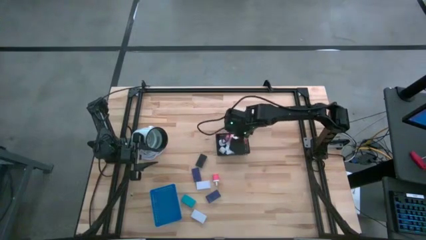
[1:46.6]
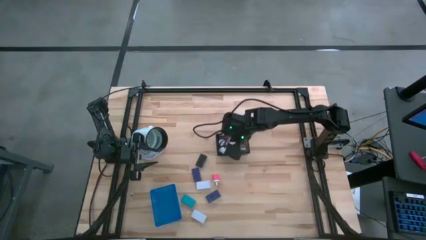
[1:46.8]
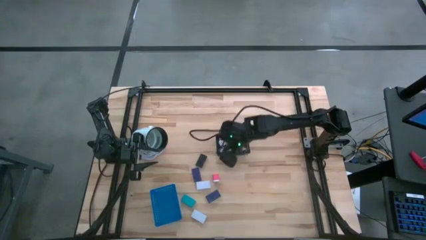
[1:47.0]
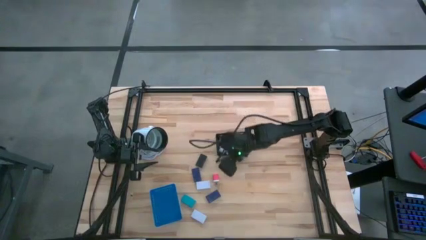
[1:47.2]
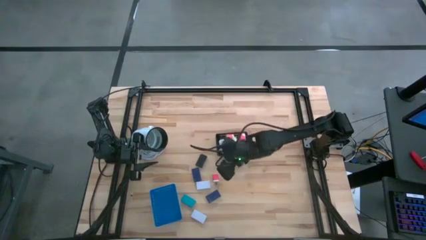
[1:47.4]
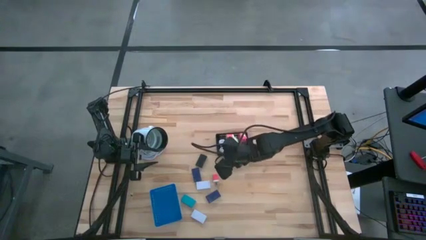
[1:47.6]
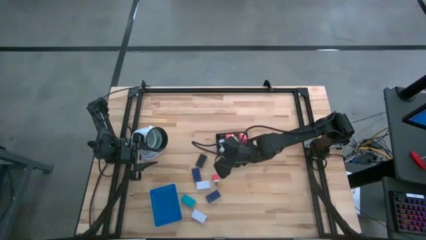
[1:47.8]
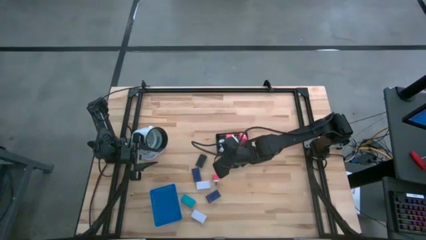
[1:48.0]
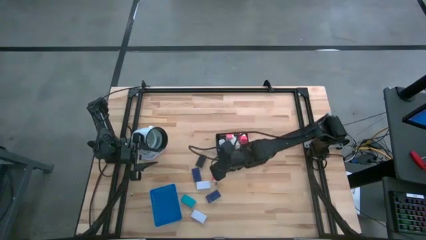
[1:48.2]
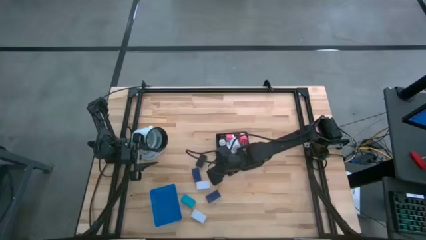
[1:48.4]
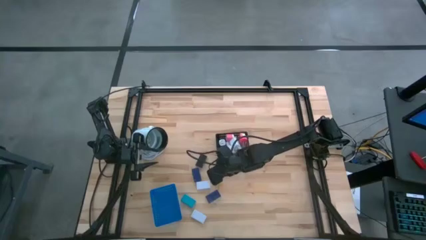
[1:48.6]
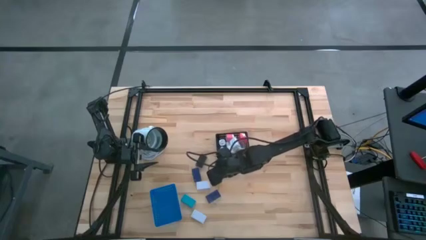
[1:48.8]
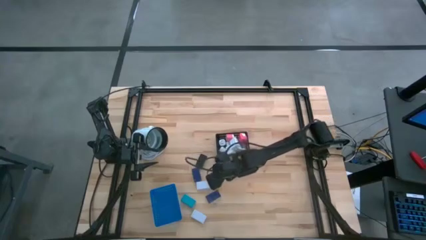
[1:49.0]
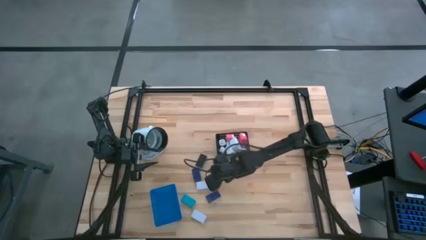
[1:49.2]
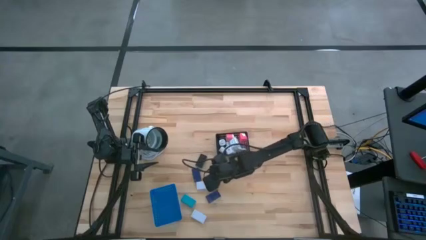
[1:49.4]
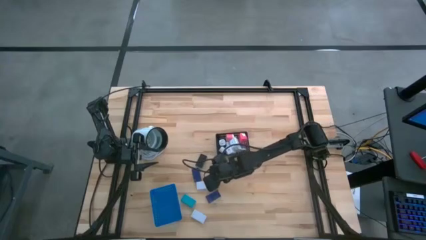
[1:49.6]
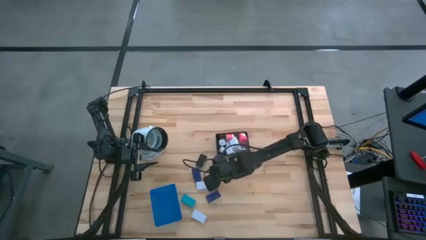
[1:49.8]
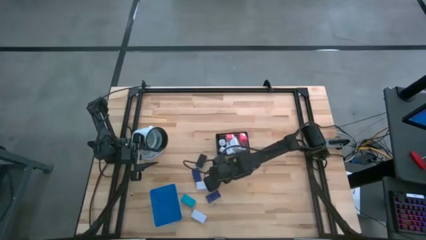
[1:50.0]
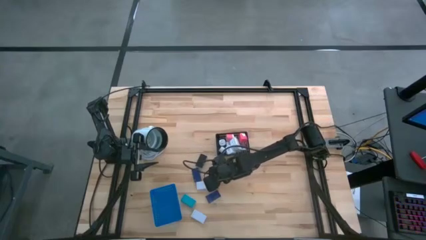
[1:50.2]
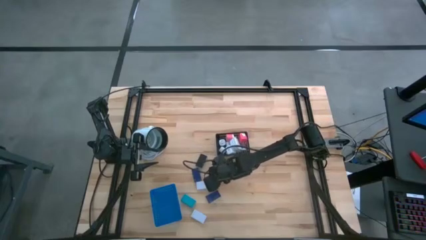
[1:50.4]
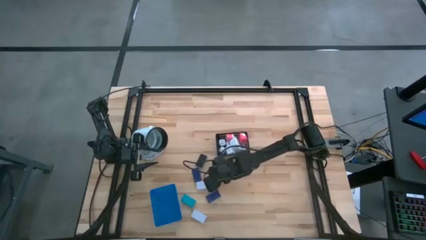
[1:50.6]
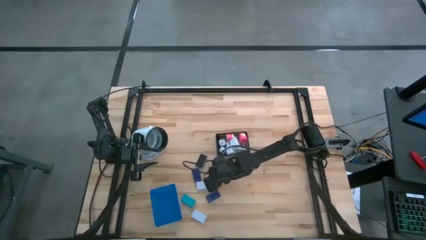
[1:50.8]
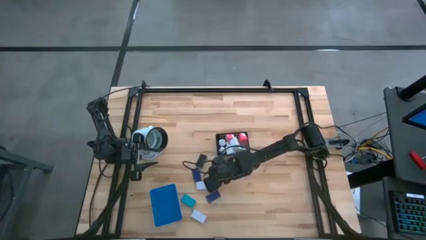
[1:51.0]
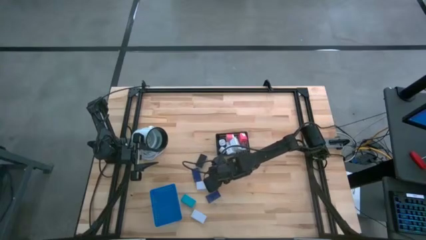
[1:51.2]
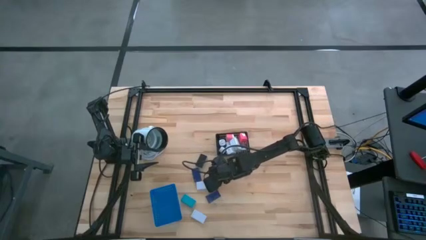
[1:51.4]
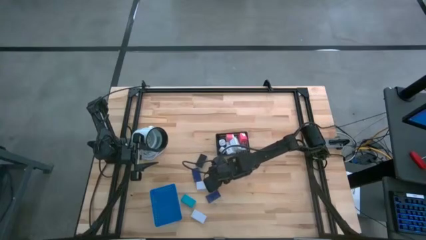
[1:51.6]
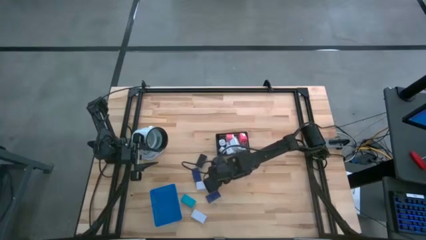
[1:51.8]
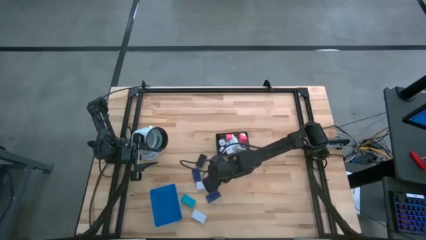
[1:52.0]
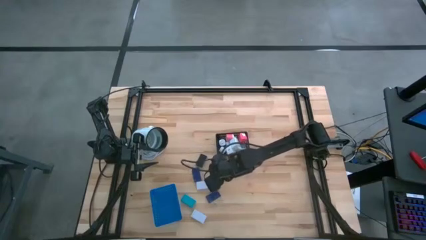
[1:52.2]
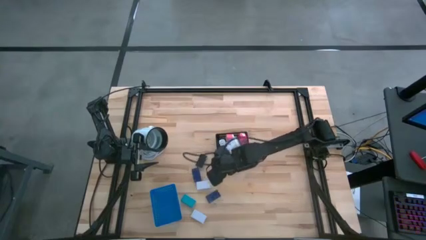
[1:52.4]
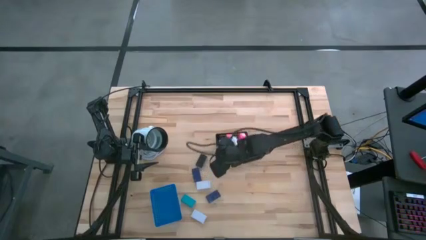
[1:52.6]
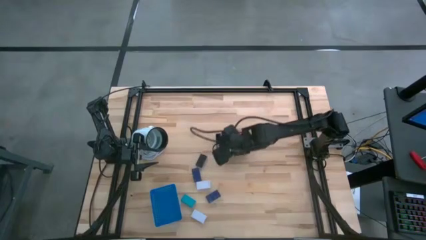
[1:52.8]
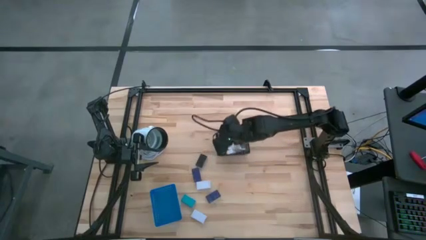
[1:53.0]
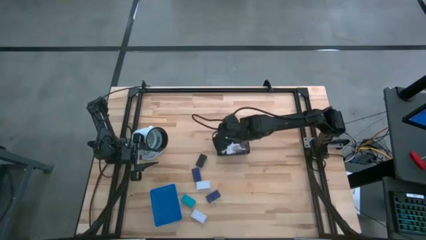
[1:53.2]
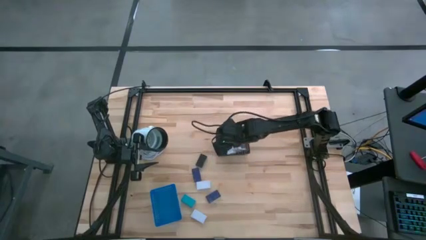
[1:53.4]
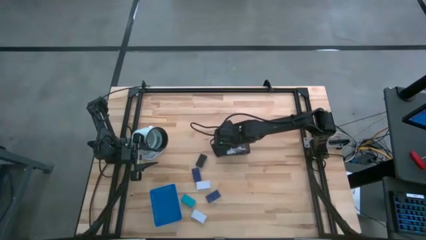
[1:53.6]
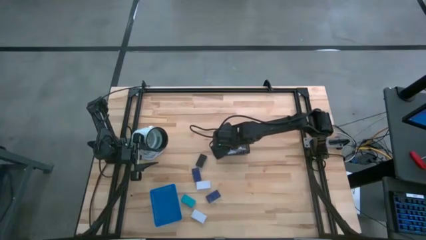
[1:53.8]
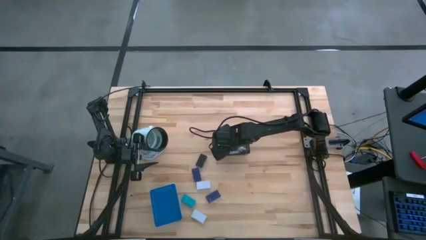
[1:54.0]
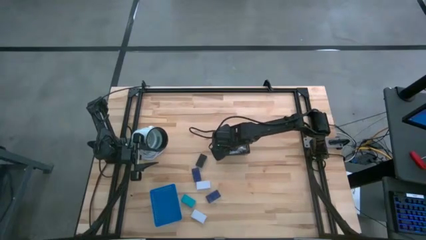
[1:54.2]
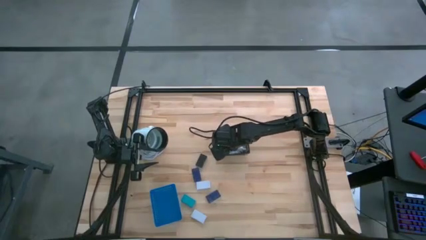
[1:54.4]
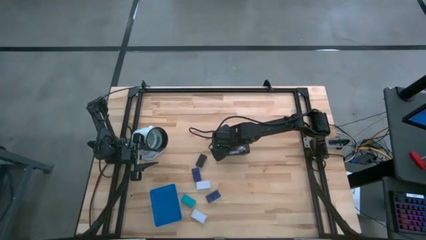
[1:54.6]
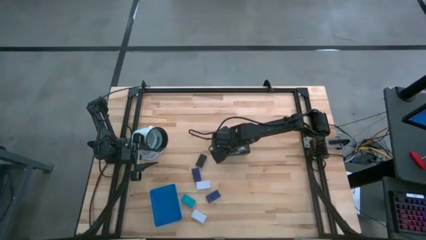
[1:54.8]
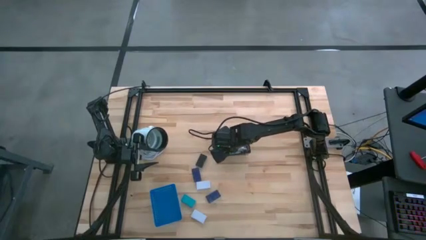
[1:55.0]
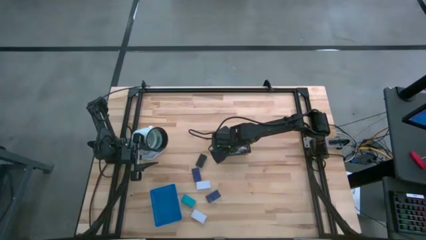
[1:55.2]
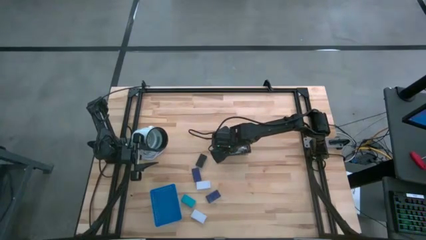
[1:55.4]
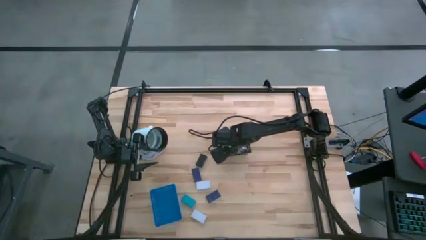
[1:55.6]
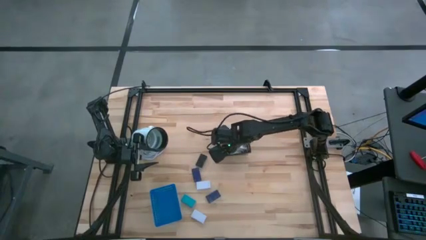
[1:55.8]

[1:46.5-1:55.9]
Task: Pick & Place Office items
Put the pink white charger adapter into the black bin

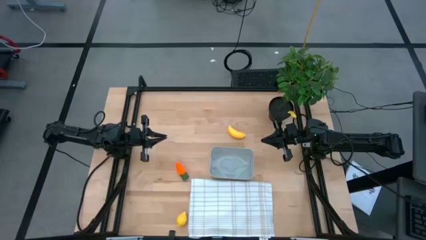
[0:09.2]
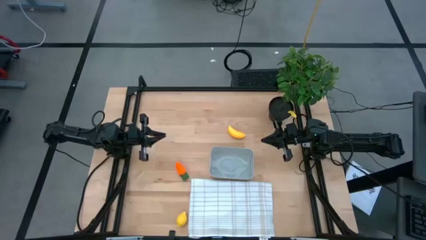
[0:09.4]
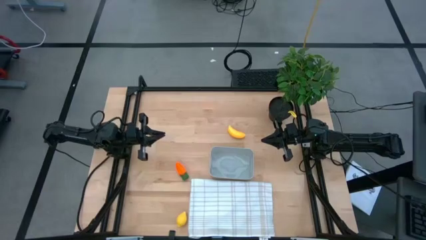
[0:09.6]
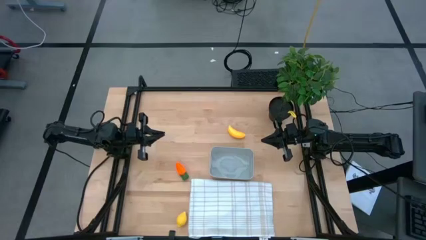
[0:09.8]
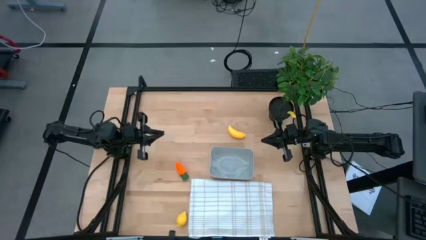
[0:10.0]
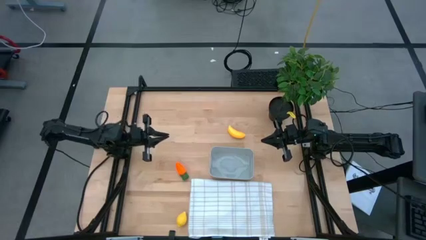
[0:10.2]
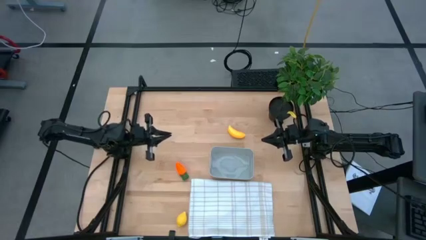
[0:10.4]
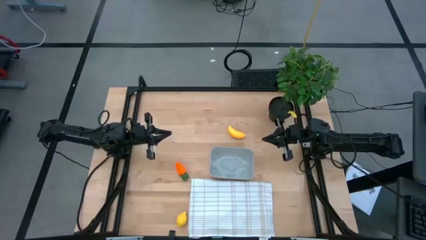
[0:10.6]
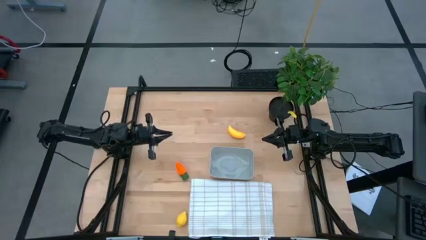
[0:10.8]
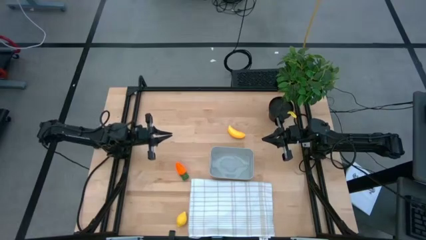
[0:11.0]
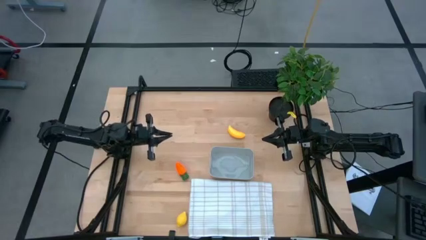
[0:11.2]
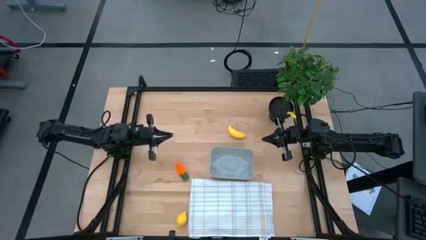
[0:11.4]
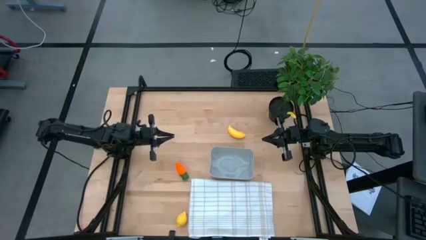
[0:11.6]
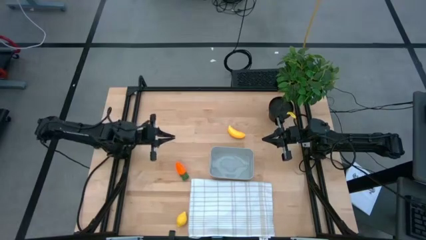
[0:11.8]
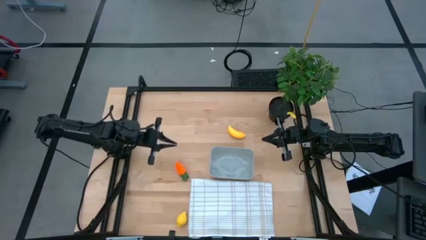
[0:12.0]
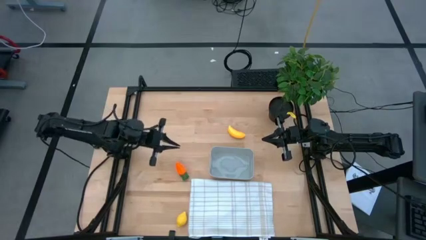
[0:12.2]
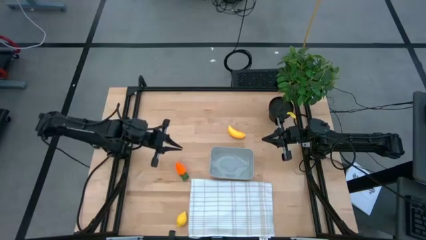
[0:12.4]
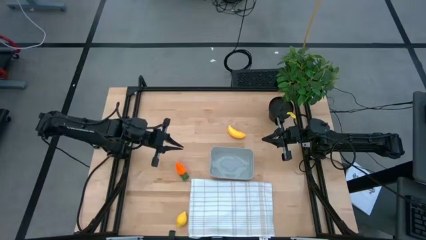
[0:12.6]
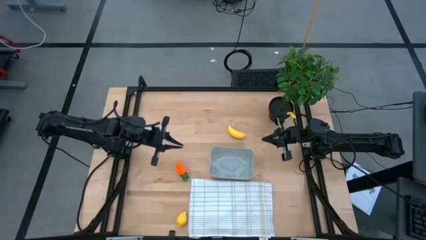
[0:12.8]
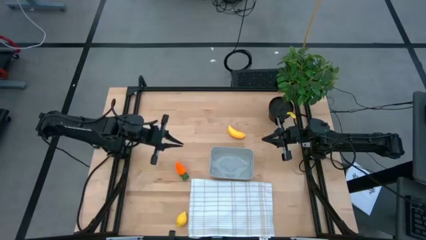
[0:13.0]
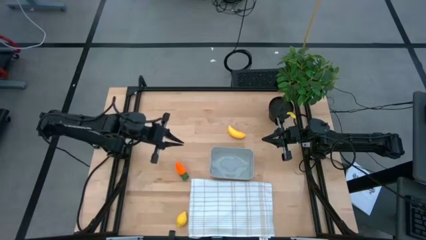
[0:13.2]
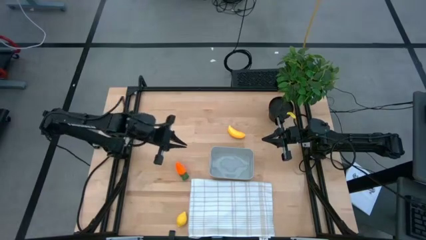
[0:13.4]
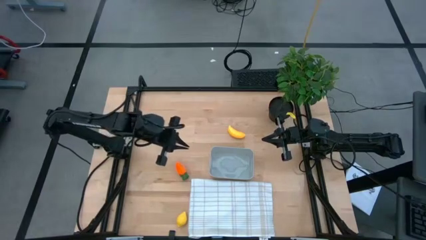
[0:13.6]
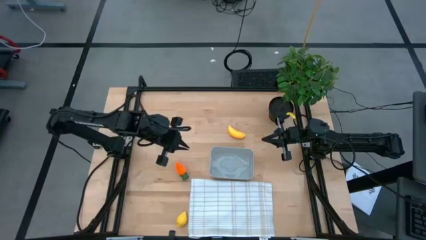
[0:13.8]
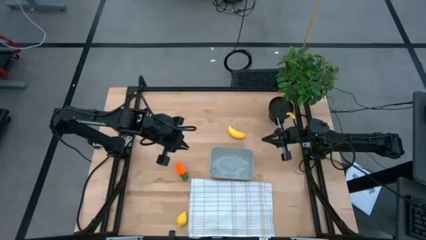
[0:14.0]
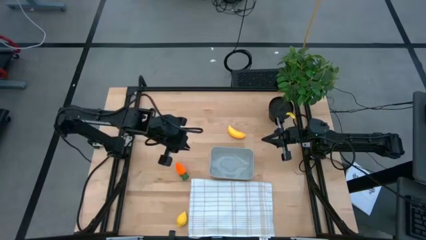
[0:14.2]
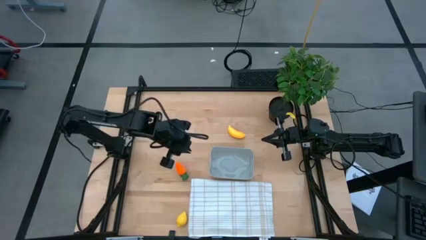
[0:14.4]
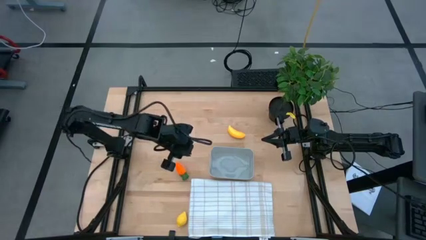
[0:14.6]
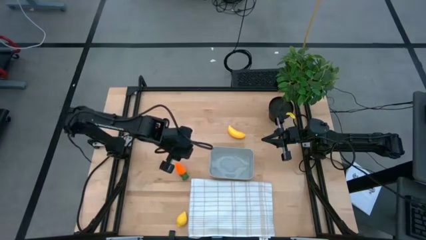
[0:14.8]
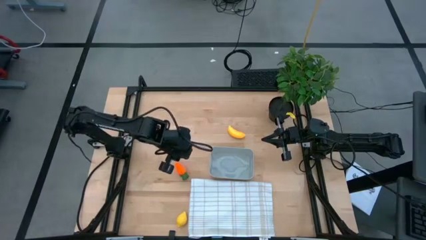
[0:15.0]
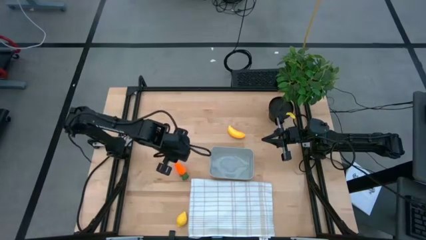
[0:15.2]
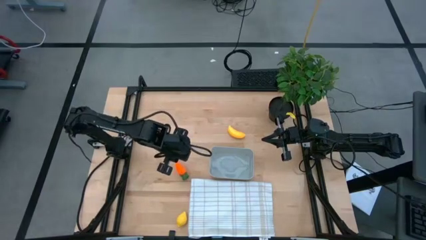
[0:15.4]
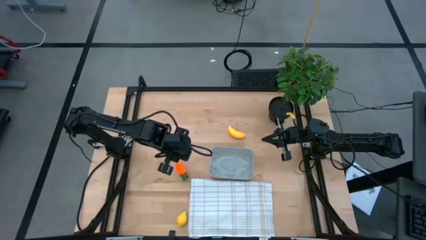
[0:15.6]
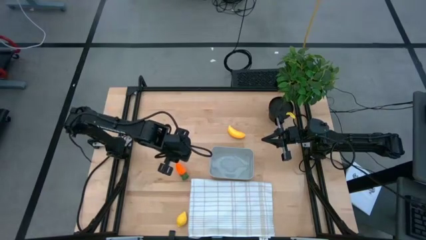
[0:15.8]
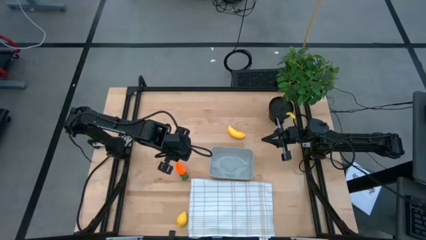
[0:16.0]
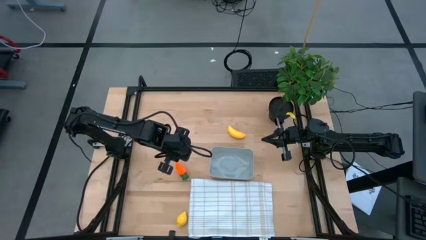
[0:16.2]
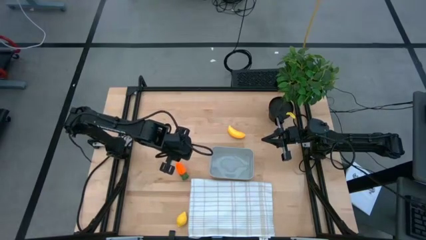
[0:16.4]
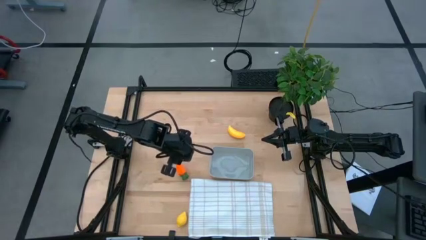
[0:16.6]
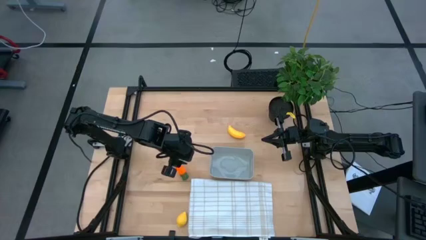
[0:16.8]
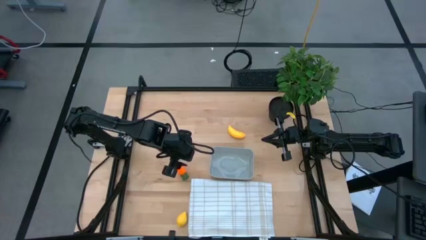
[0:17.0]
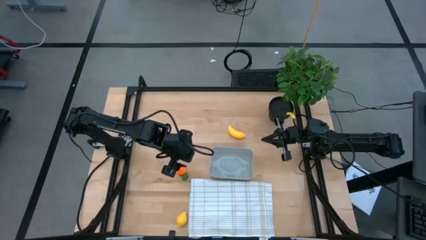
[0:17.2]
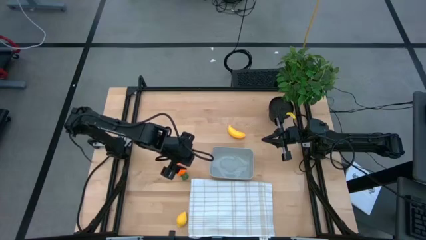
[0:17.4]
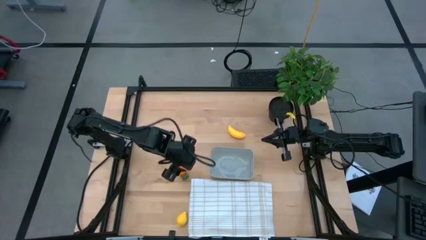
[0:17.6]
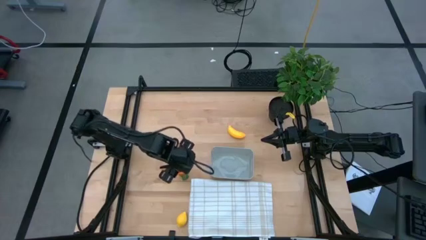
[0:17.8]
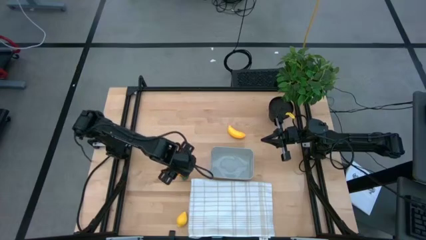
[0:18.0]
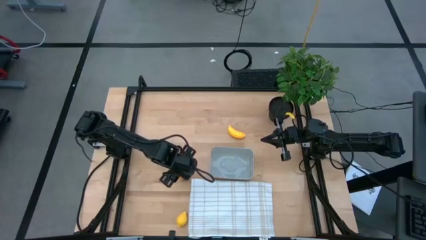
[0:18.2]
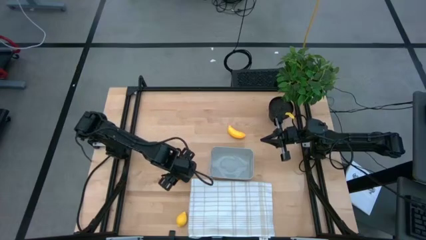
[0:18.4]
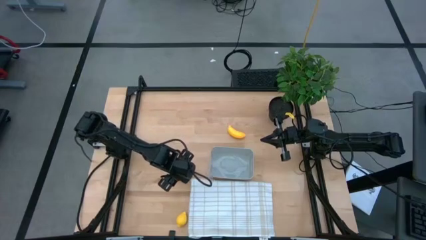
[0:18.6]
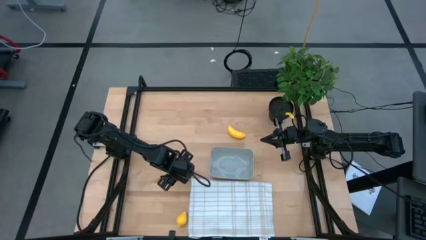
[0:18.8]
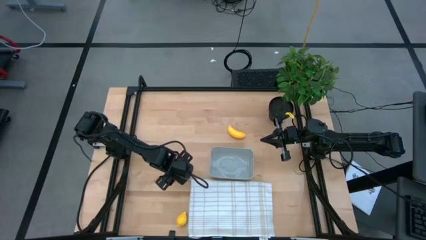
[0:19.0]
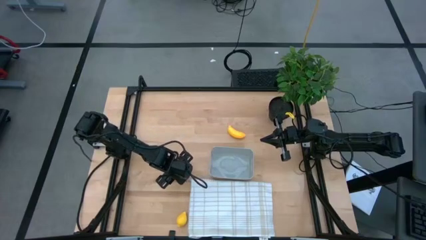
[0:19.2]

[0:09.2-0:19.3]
Task: Pick and placing Produce into tupperware
Put the orange carrot into the gray bin
